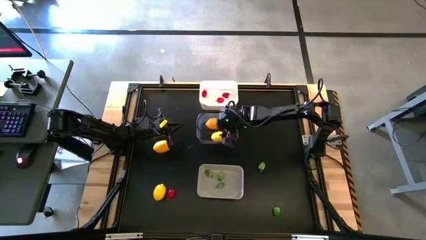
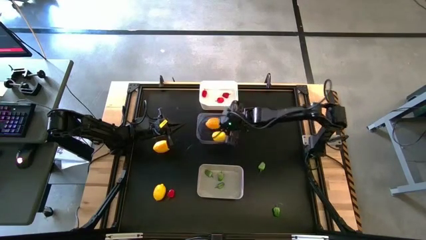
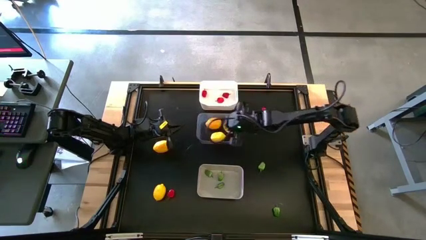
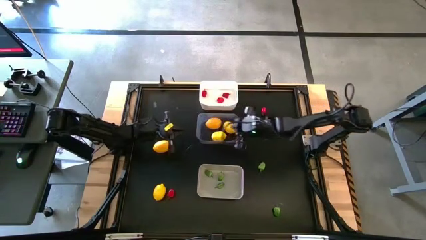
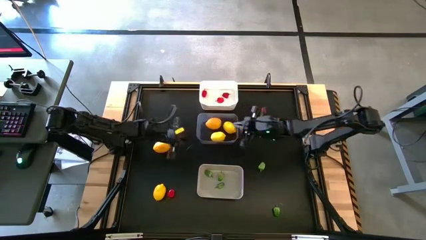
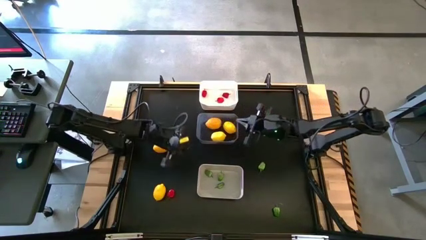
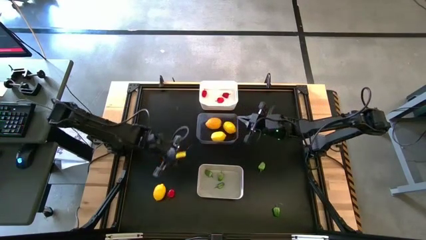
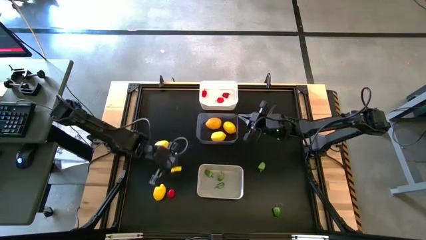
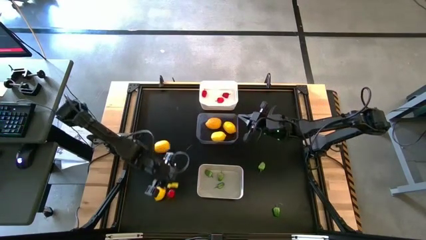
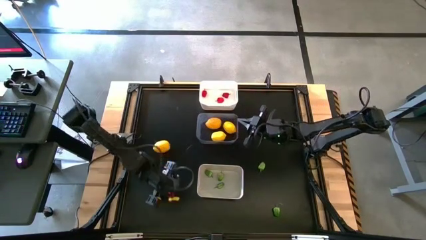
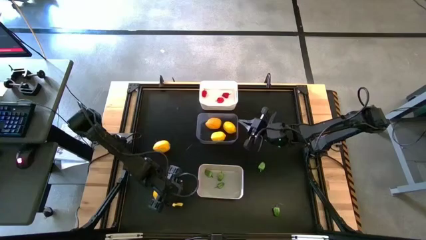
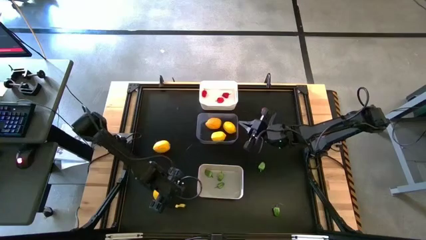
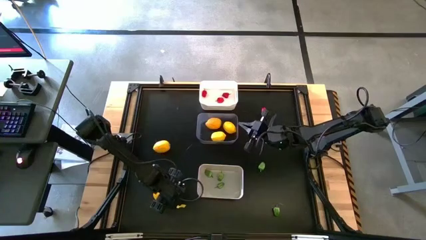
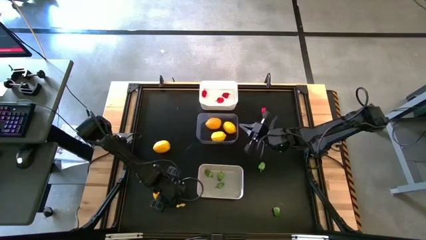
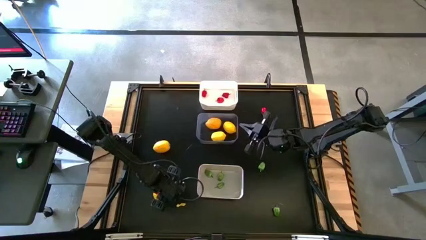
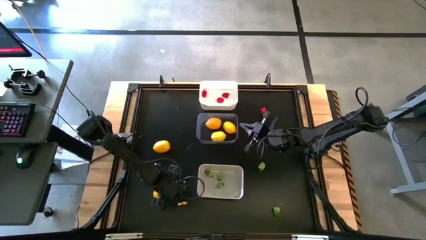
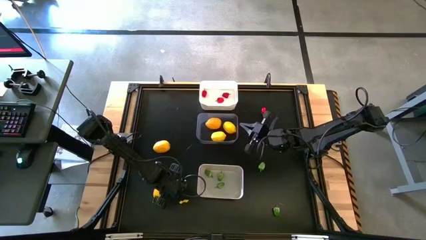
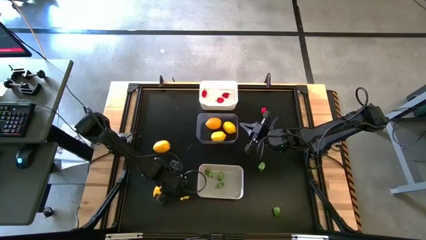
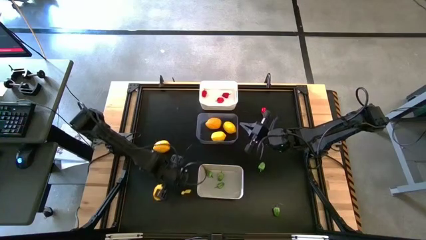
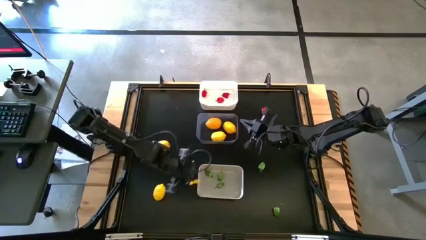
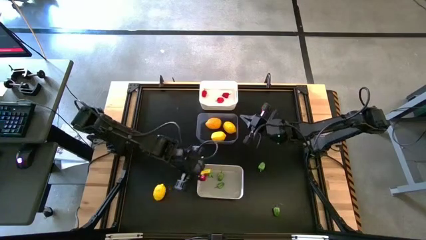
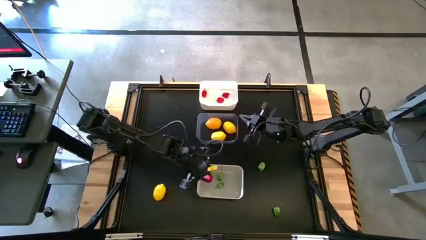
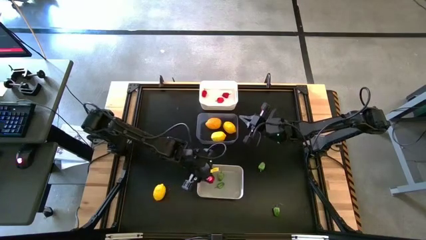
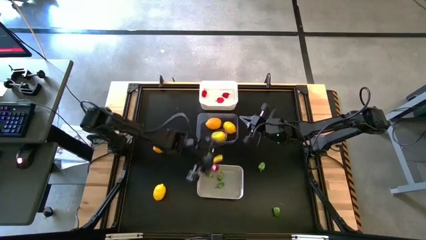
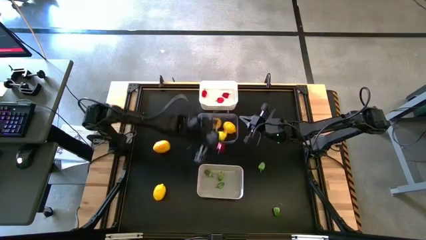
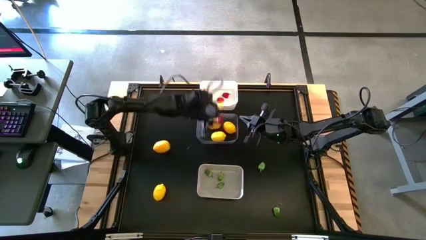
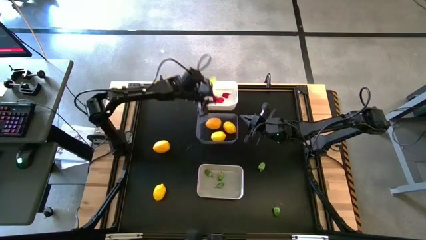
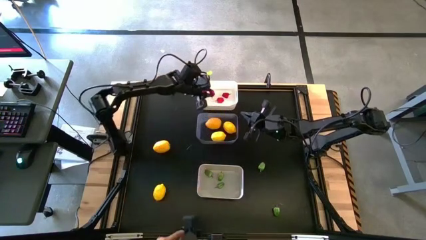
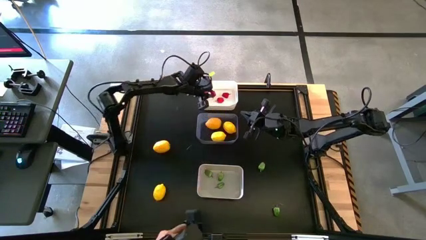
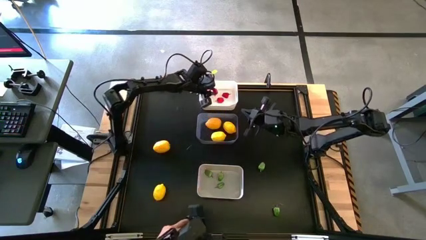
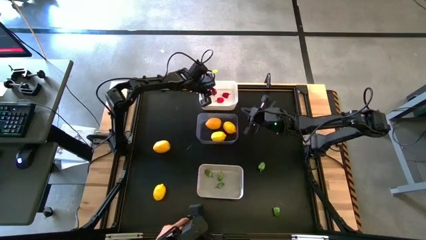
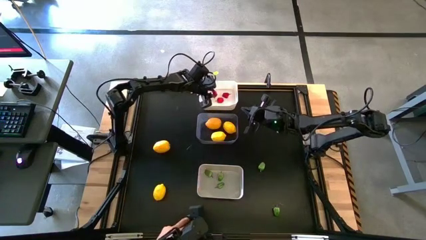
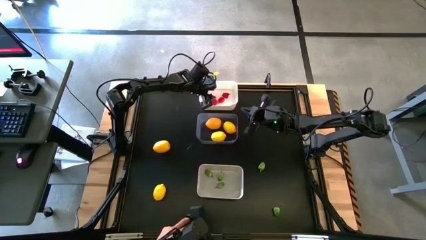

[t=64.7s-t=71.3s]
Task: Sort produce into baskets
Put the red chili pepper into the white bin

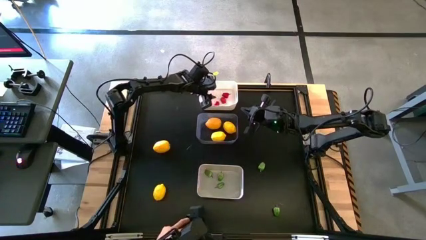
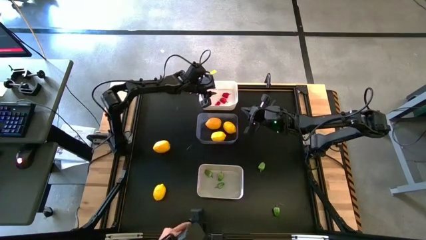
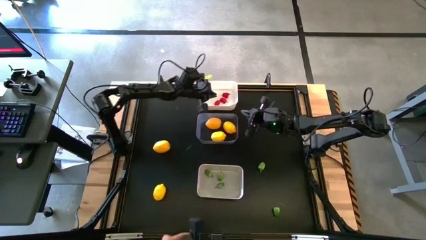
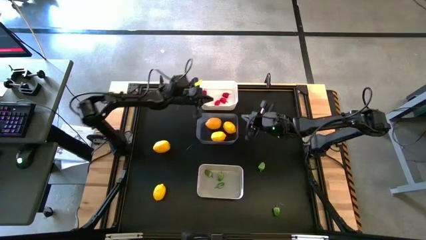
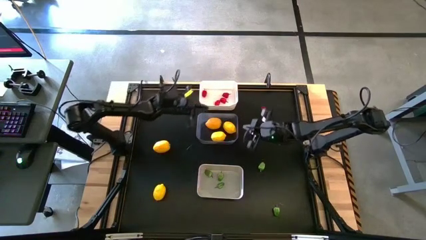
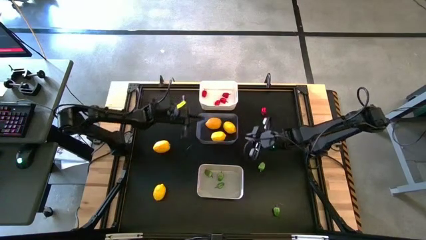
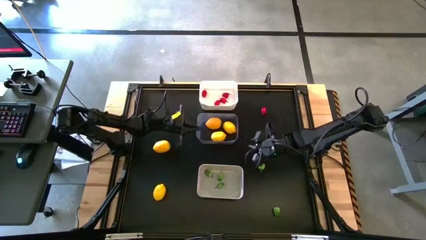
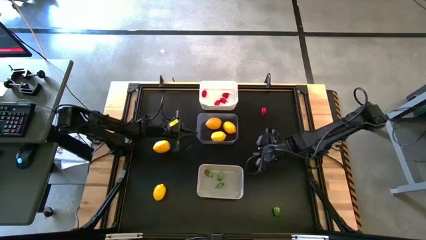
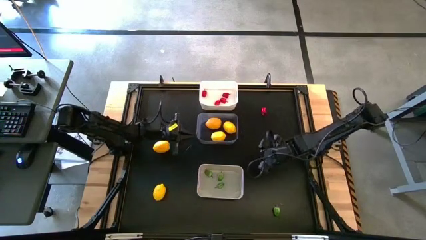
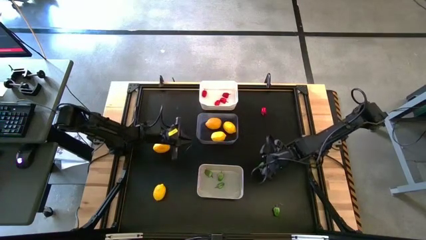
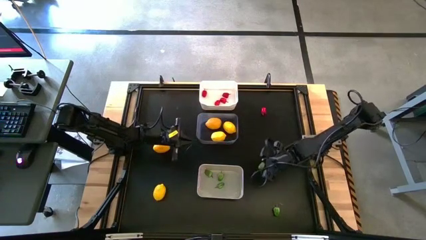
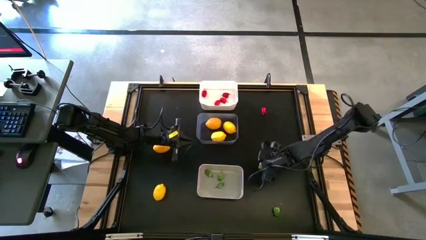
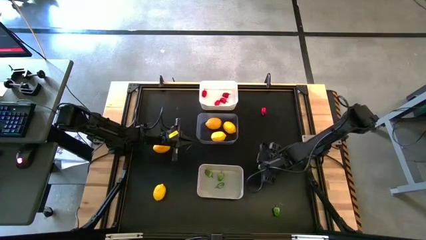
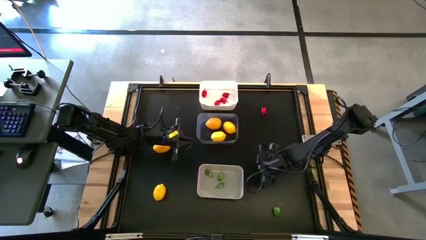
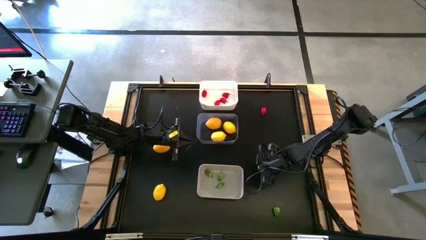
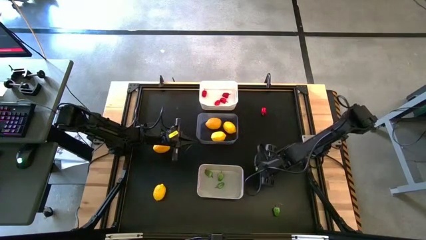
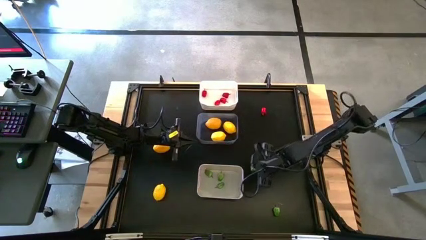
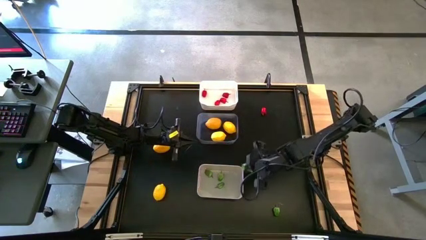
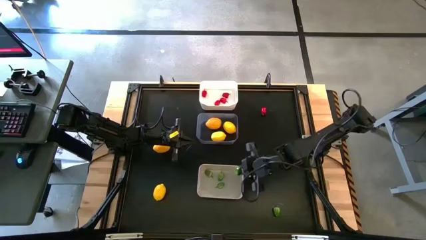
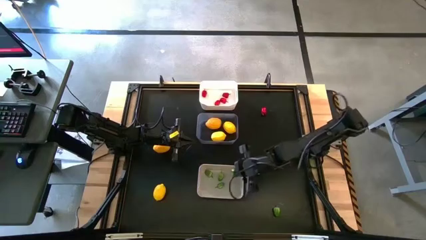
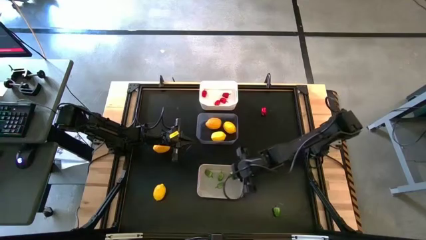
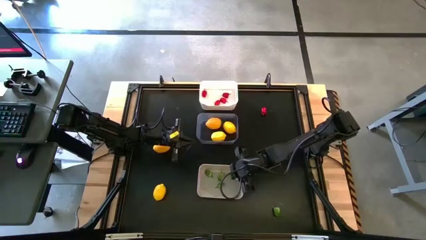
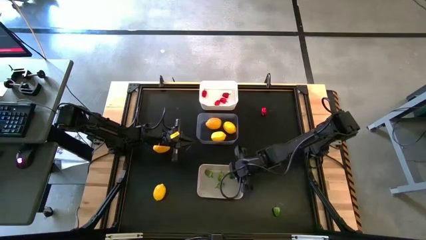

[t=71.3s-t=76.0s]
Put the green chili pepper into the gray bin

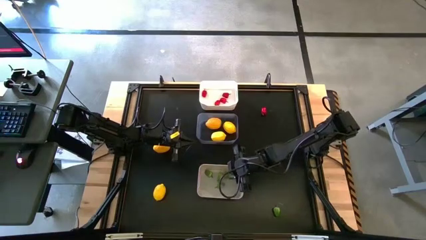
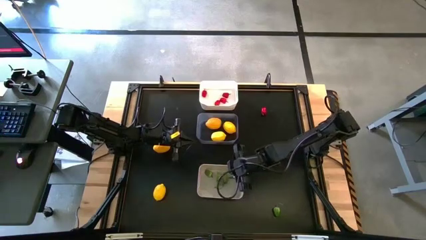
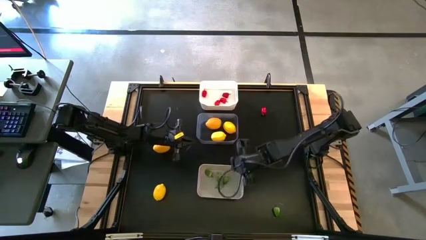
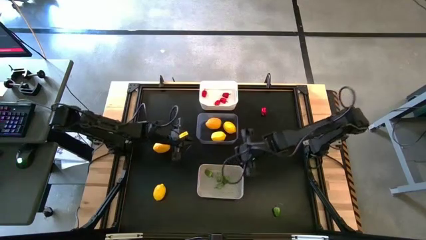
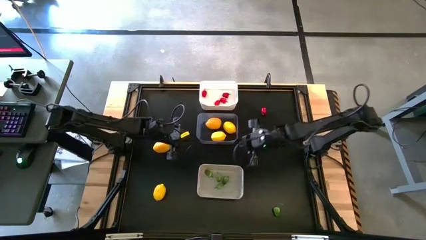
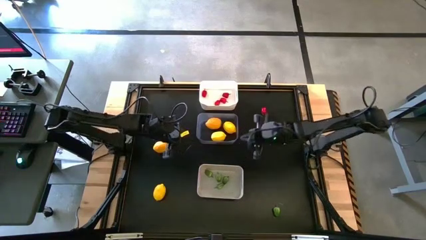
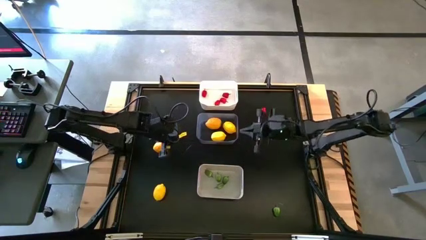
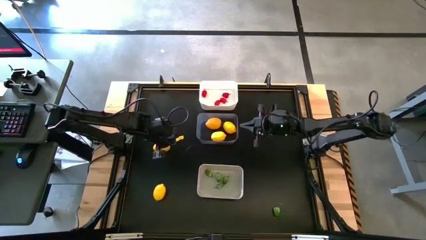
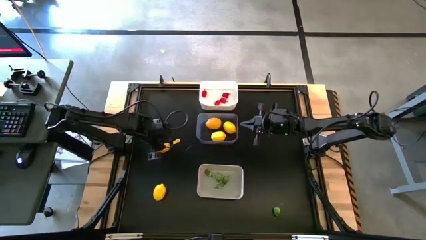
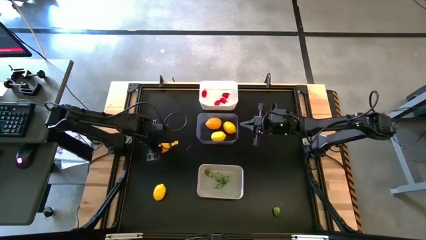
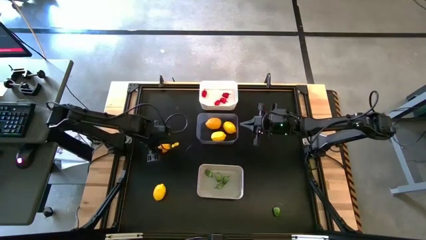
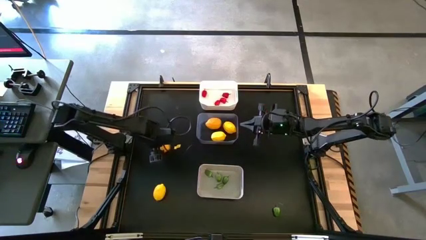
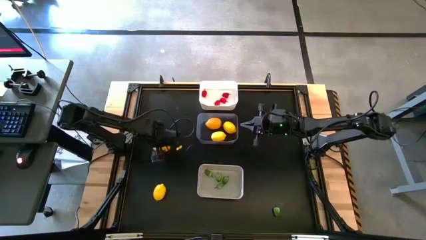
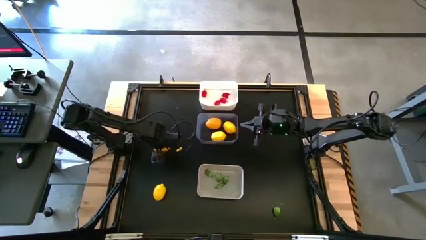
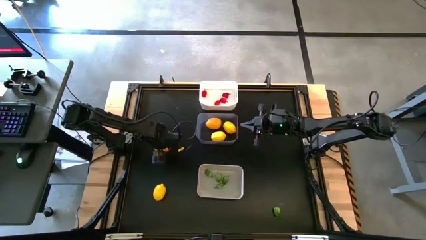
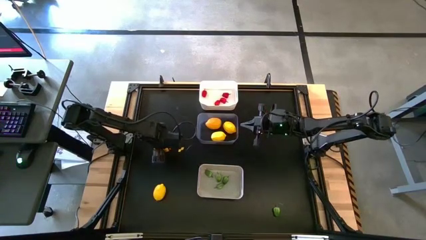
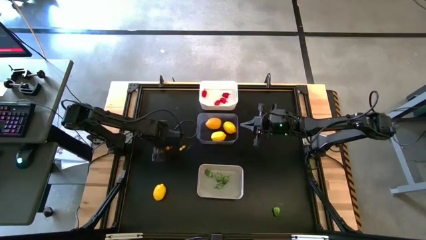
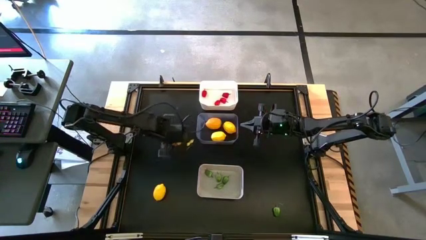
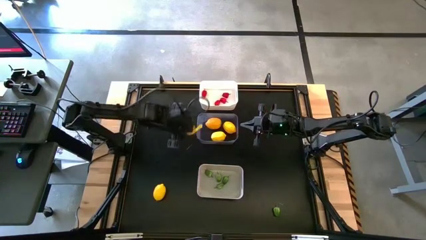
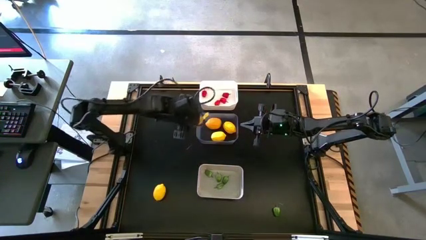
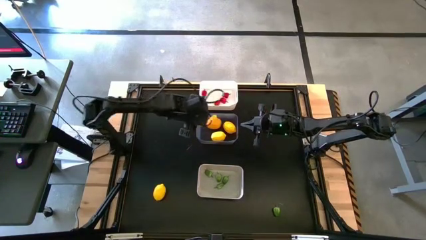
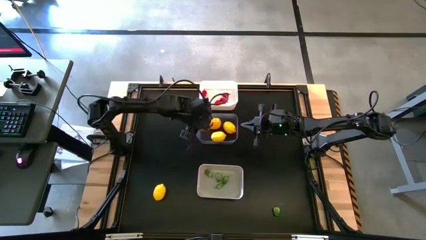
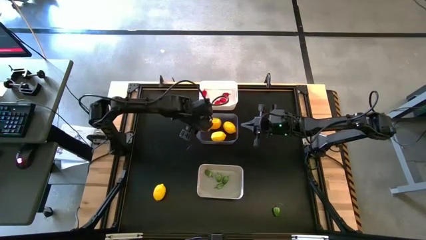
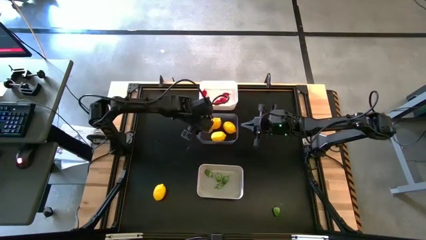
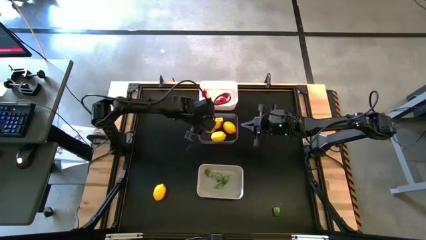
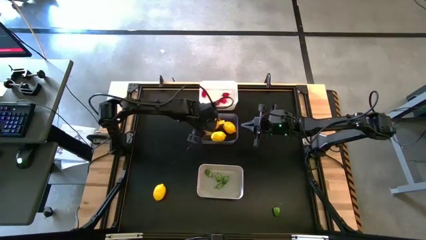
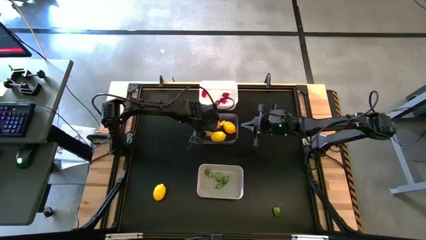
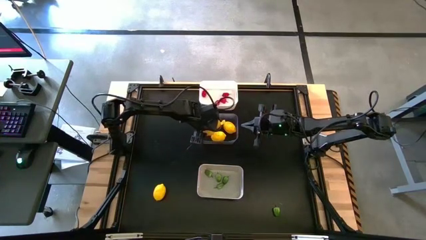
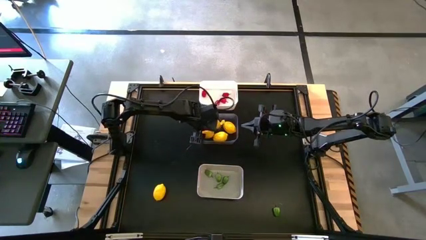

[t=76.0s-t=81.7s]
Put the yellow lemon into the transparent bin
